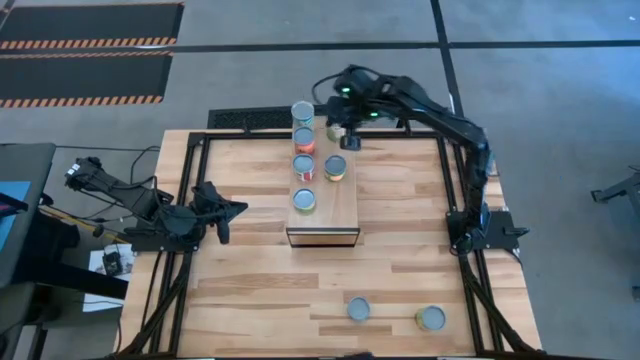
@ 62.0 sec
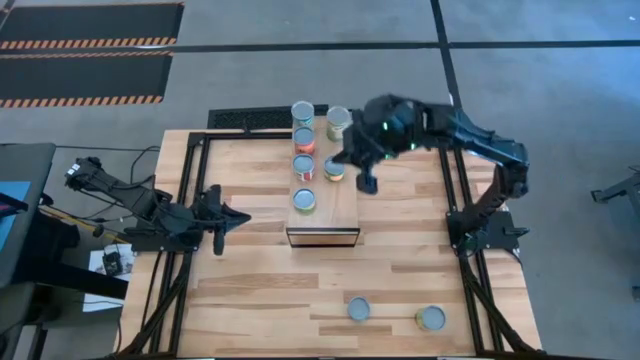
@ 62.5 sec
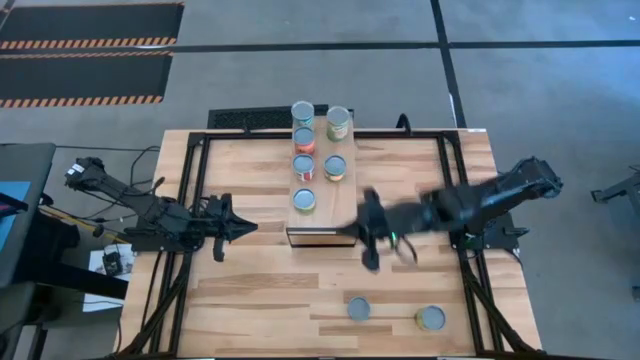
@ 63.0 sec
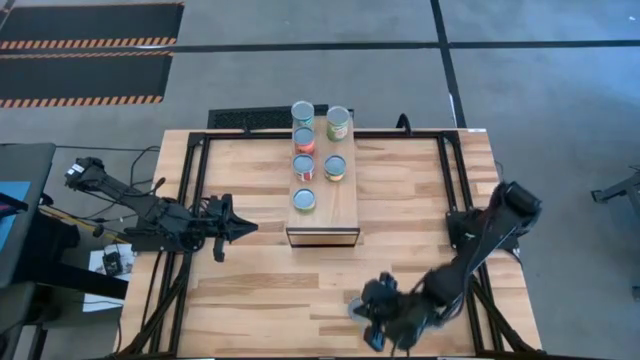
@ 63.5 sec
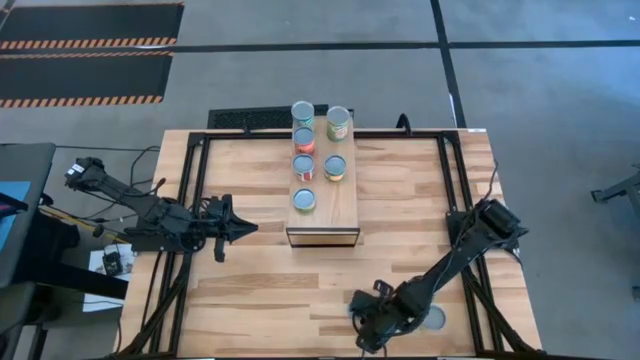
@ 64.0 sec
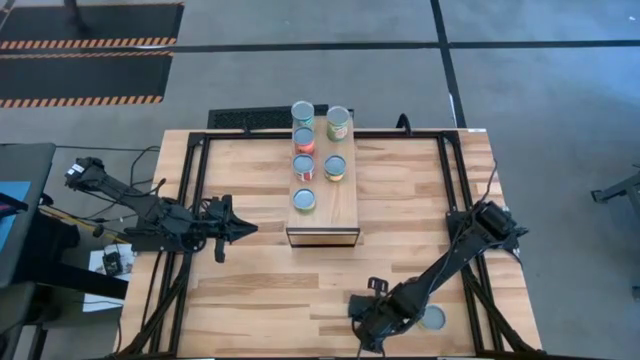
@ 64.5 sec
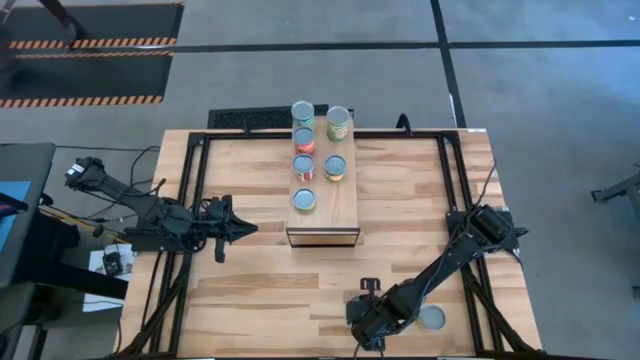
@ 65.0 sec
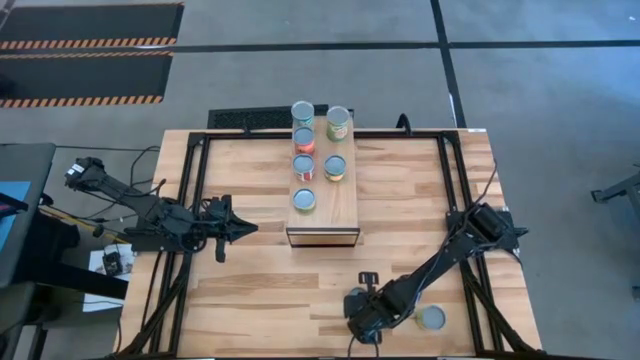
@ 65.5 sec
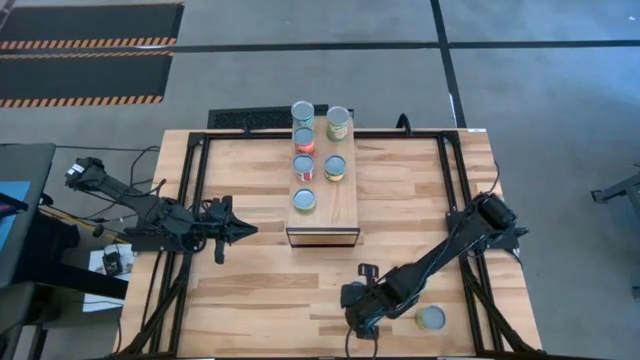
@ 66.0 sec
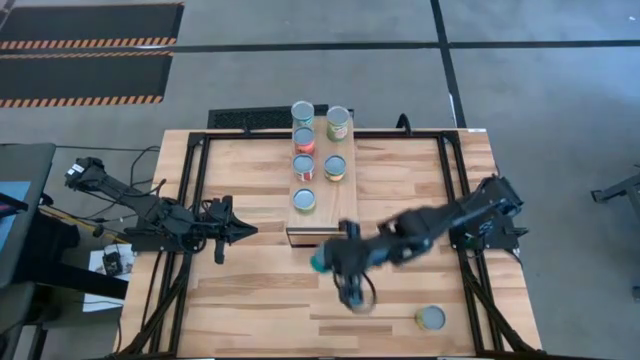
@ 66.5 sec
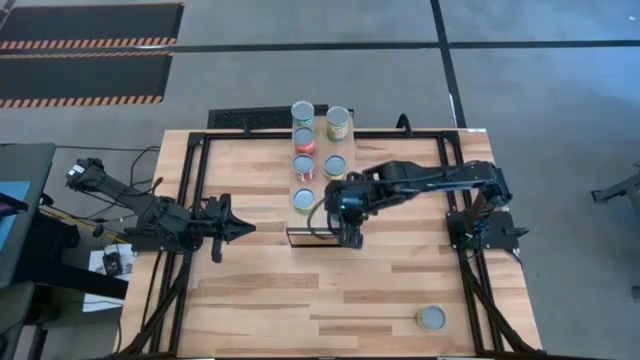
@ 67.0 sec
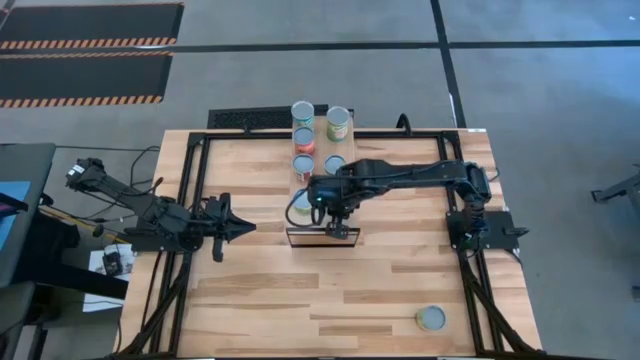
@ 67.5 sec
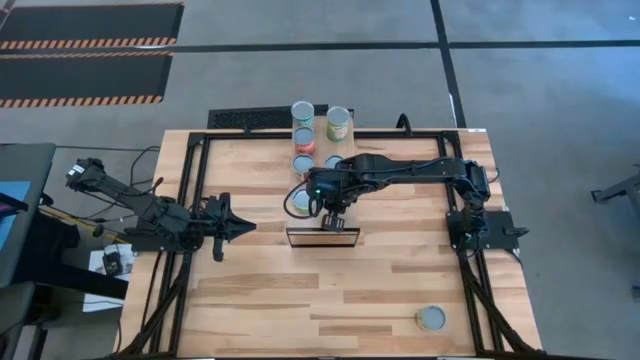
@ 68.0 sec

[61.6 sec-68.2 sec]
Task: Pick and place cans onto a shelf
Put the canned tuna fish on the shelf

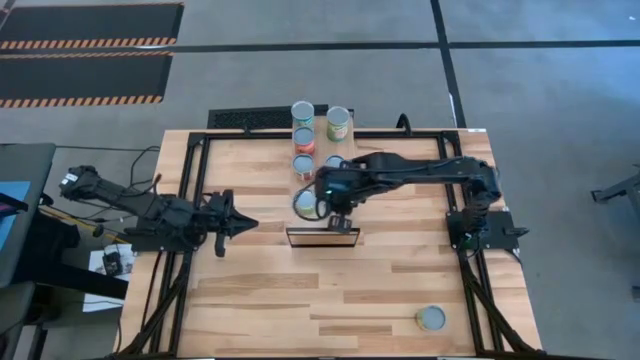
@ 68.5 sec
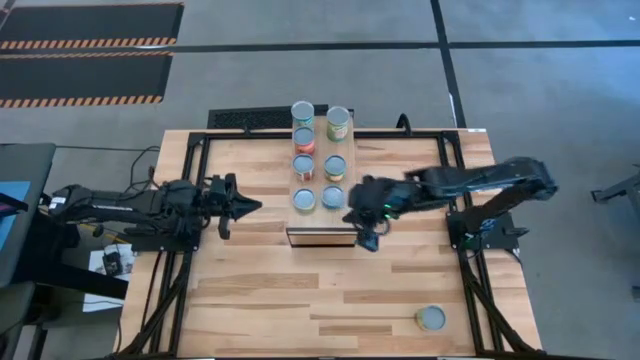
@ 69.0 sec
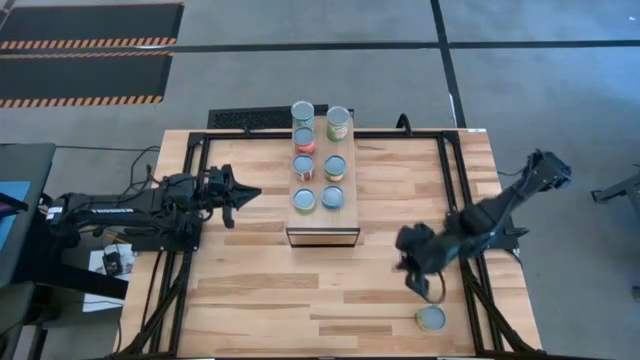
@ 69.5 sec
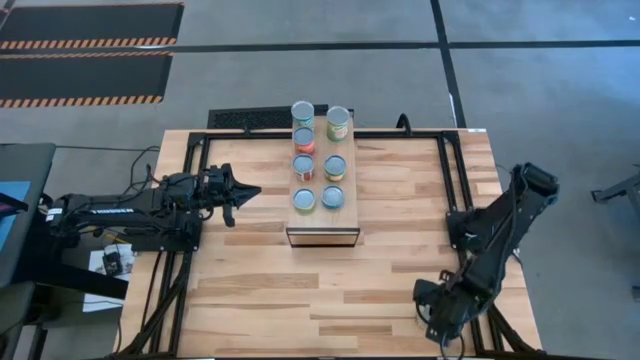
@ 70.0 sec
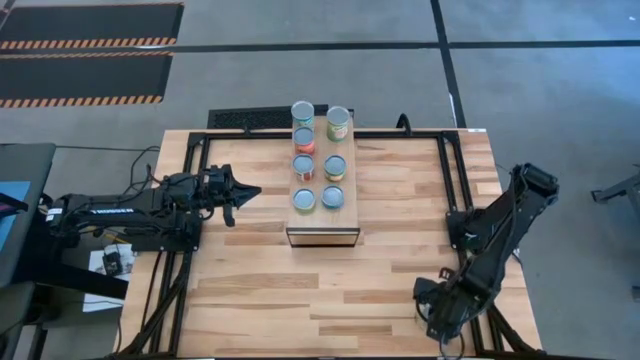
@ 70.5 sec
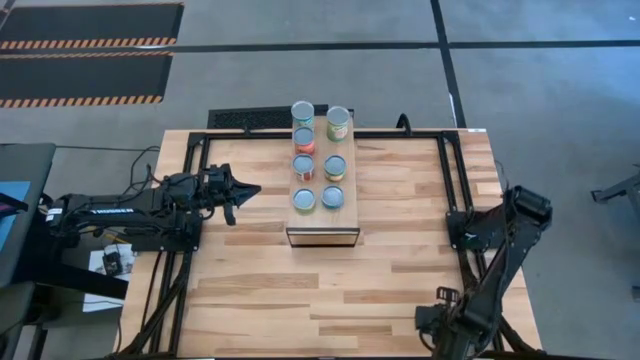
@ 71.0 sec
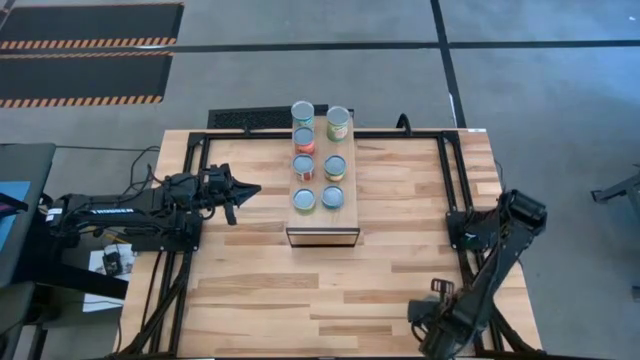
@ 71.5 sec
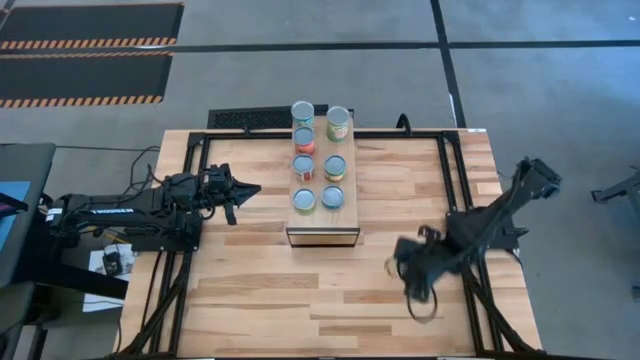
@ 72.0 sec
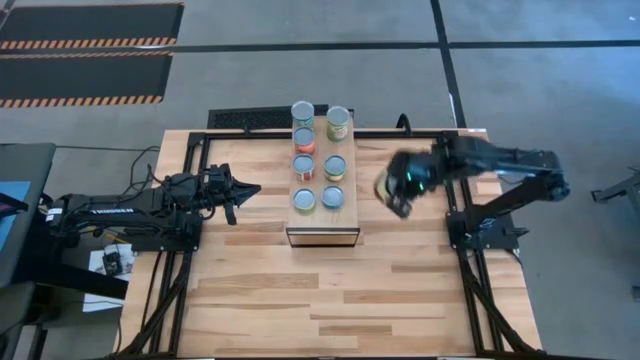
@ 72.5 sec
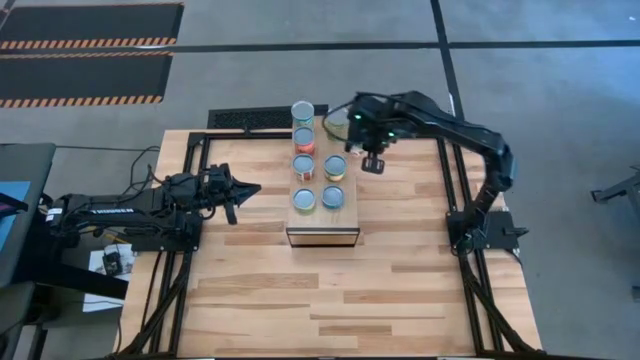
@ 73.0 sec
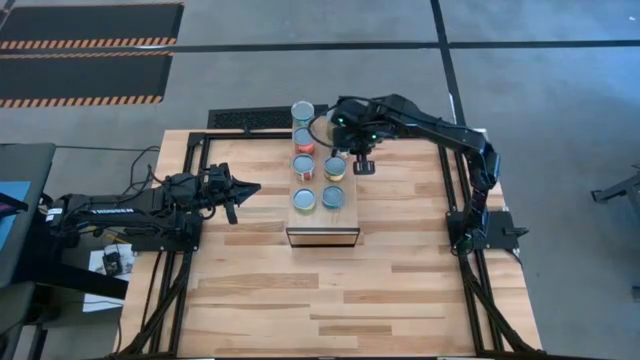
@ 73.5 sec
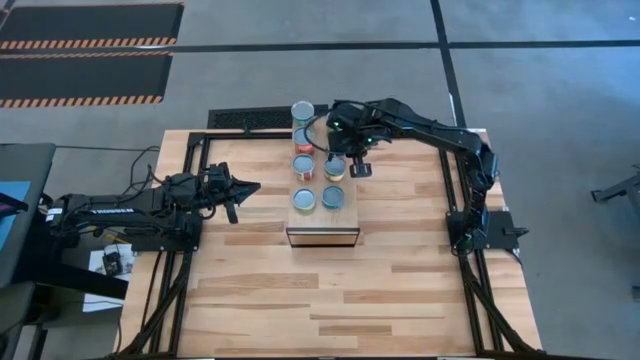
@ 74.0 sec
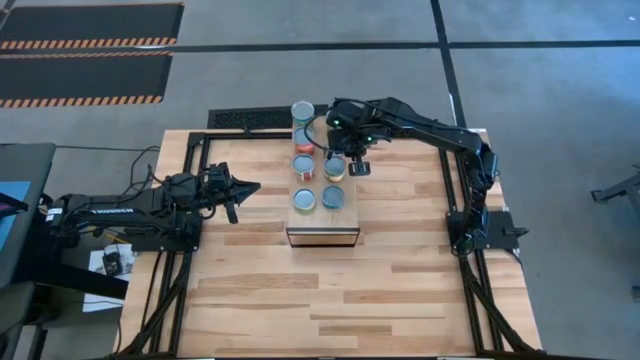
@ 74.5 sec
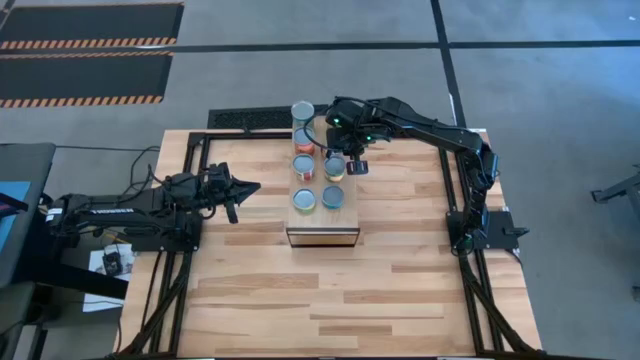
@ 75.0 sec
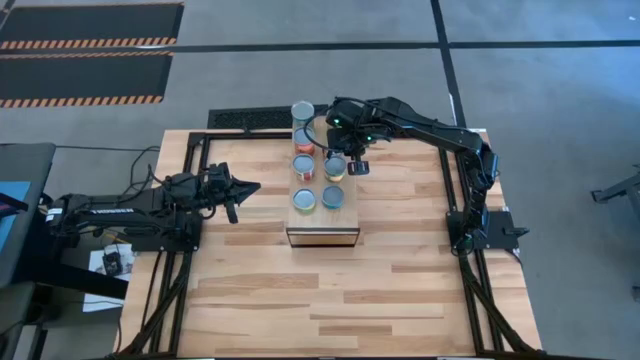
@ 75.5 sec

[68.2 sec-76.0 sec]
Put the canned spaghetti sauce on the shelf

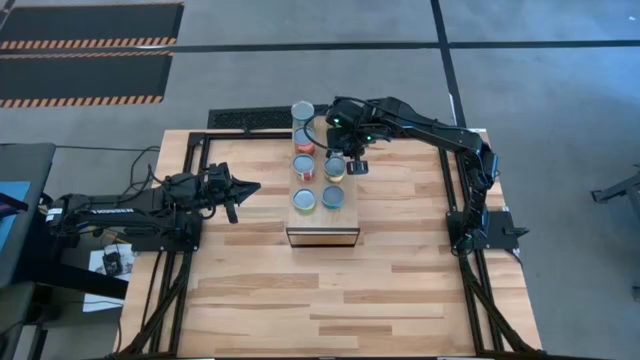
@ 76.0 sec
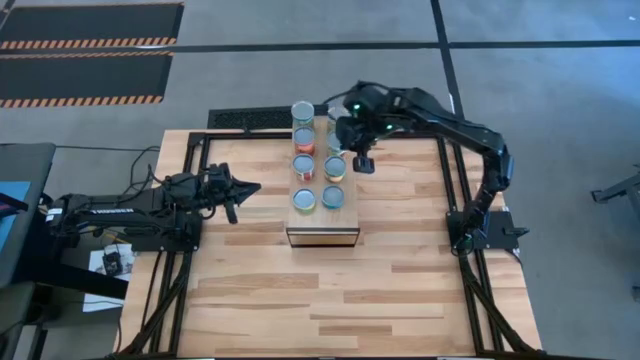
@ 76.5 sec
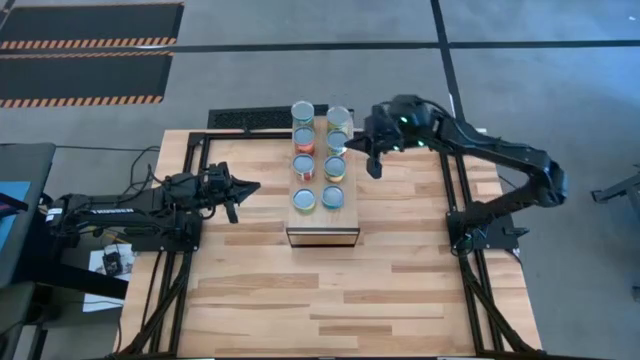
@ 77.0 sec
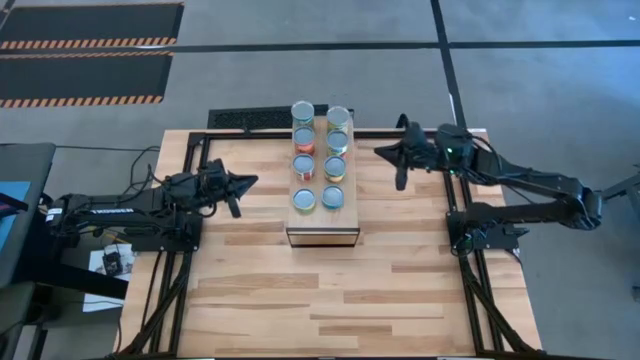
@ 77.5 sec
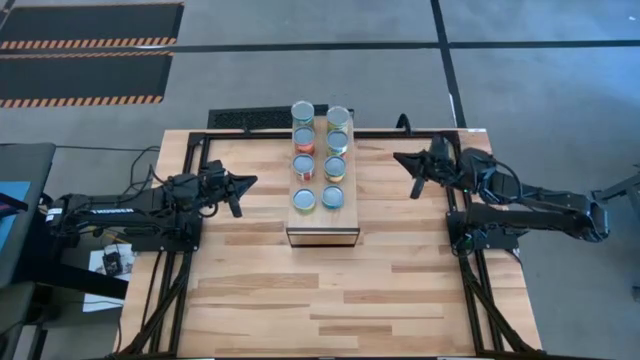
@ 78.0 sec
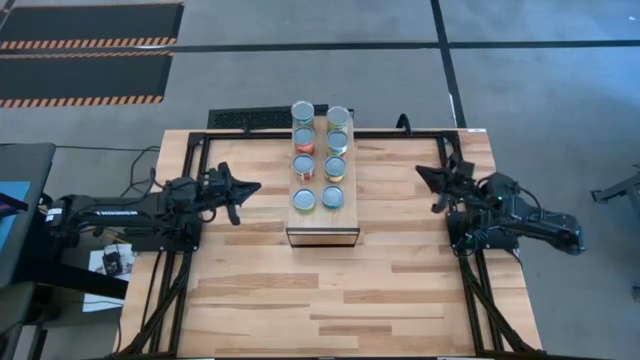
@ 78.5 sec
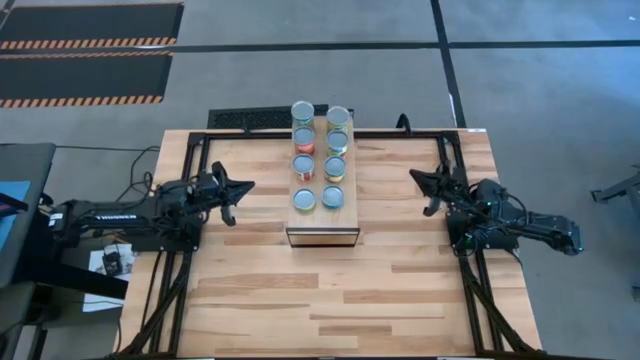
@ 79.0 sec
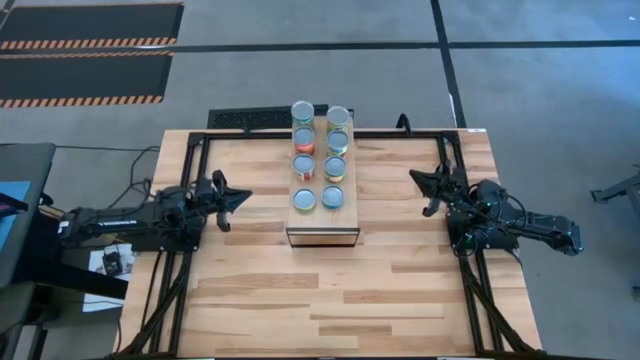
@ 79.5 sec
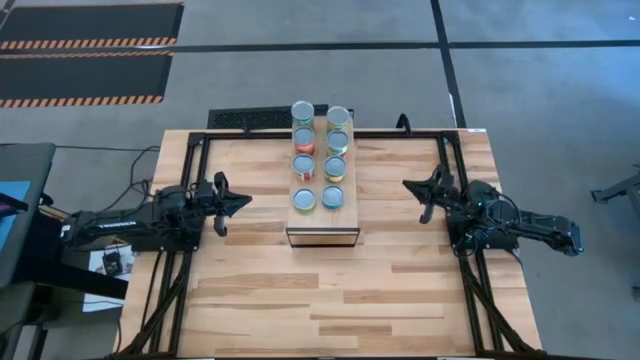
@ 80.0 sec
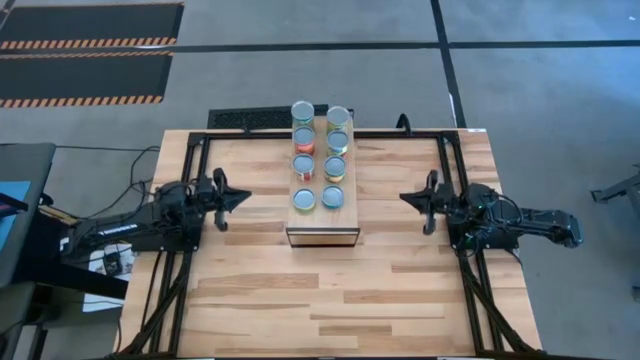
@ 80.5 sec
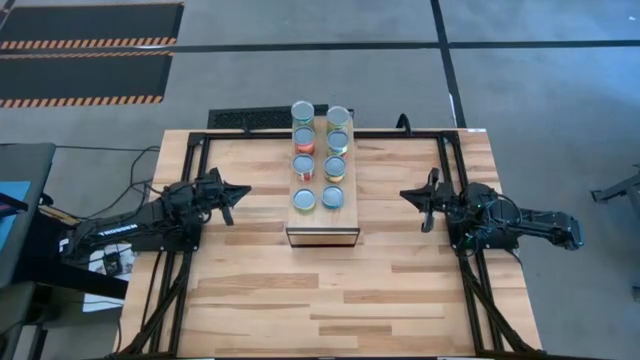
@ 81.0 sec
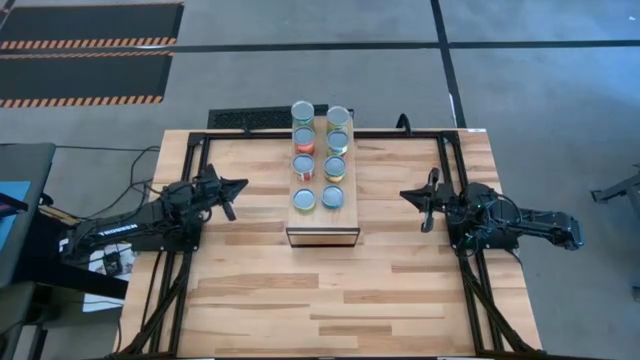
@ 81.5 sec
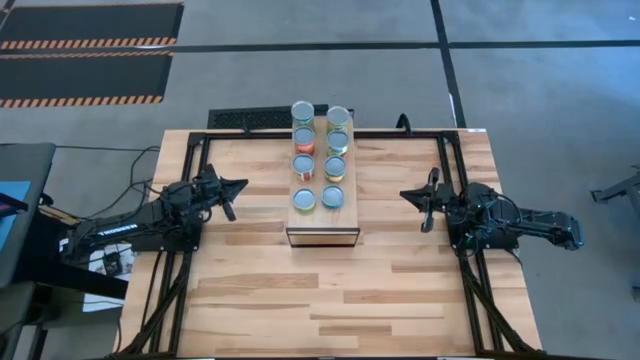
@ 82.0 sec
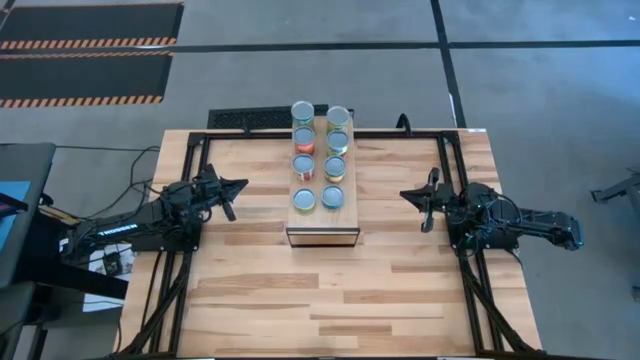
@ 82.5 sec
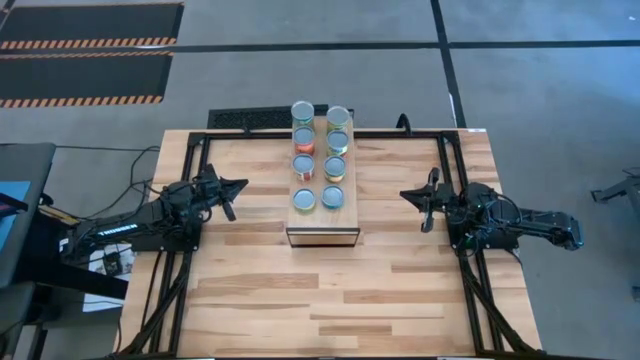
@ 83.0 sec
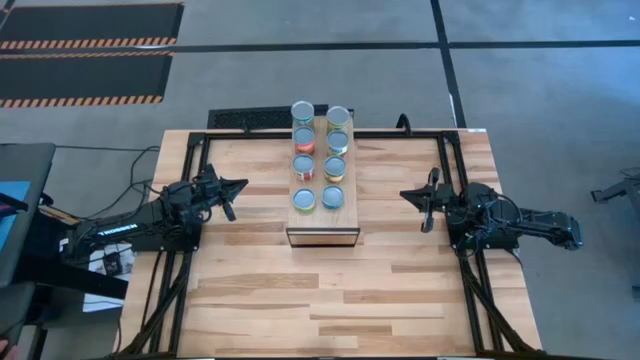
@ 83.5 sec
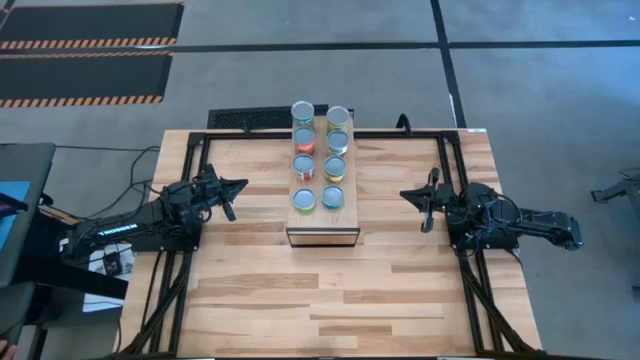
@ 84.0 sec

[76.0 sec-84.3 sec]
Return to Home Position
